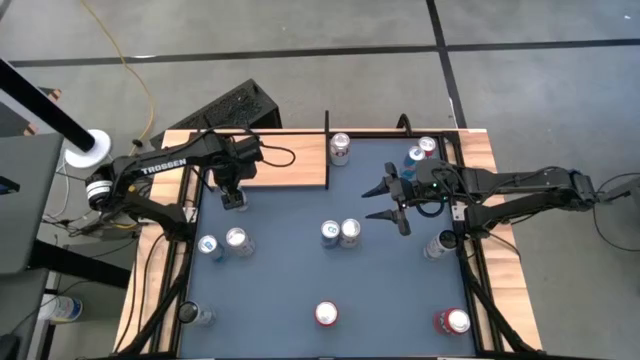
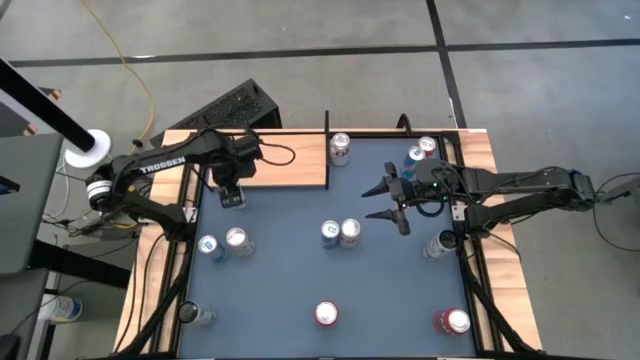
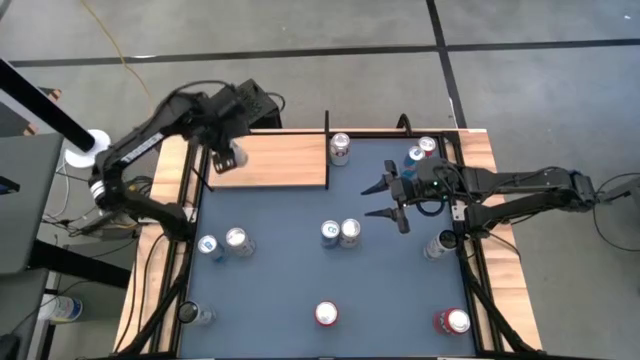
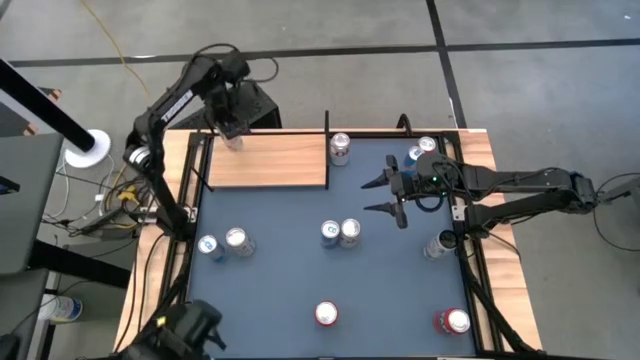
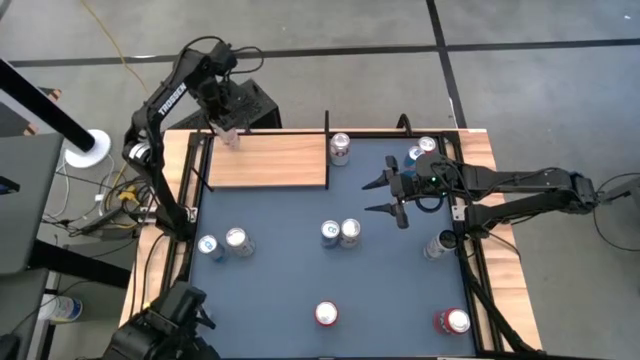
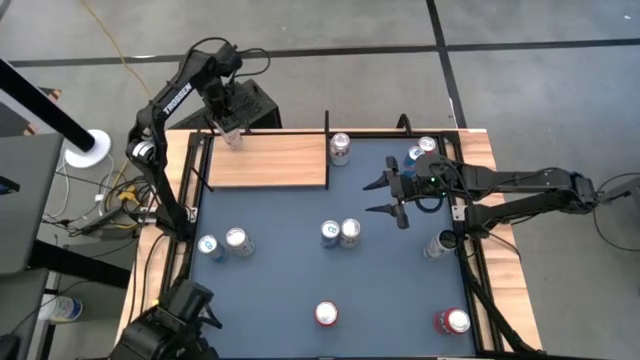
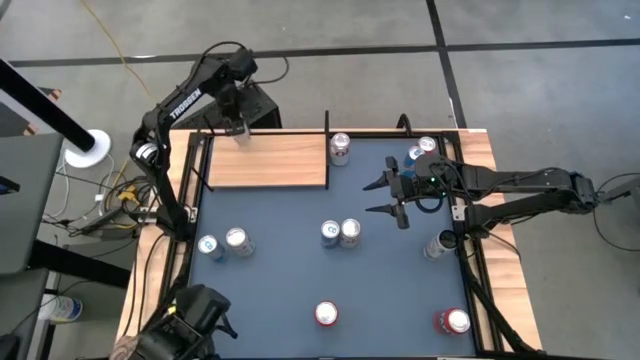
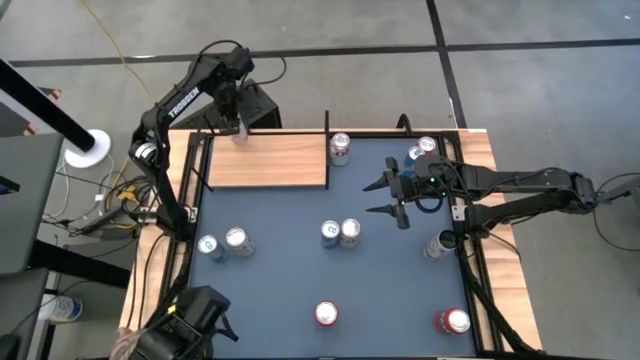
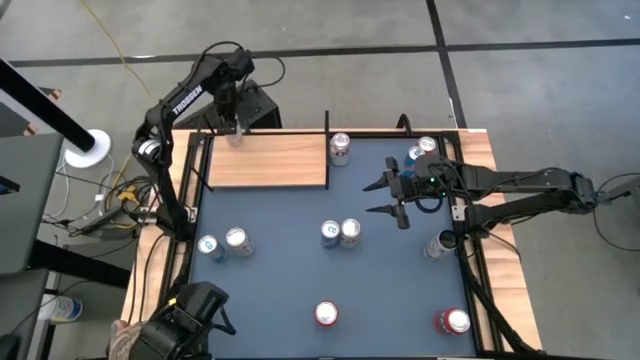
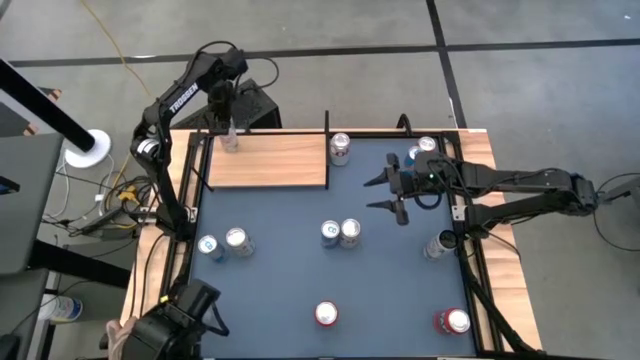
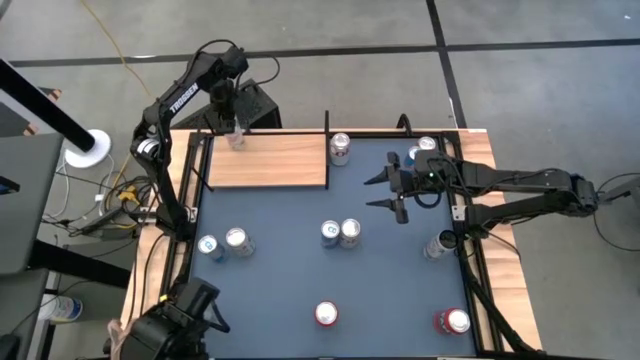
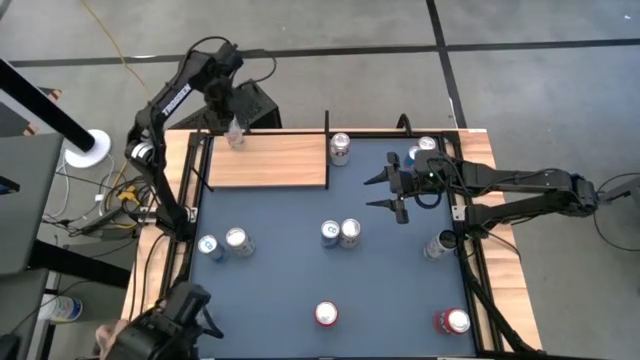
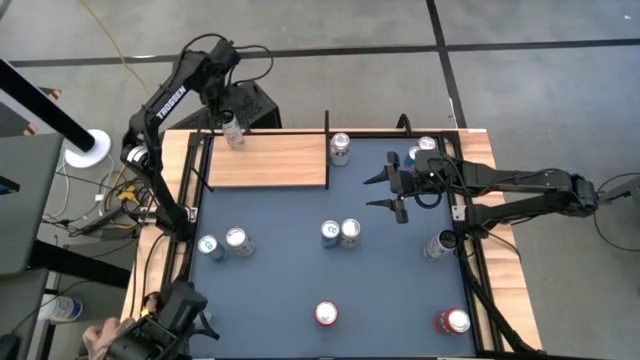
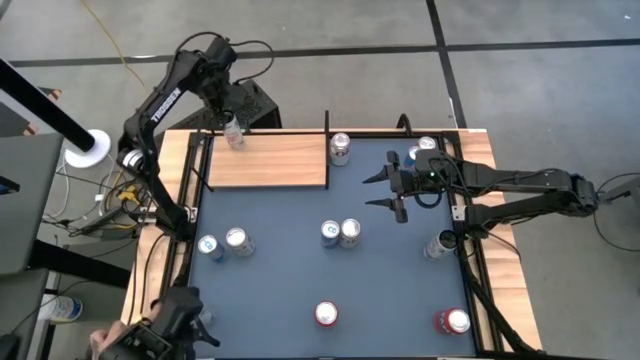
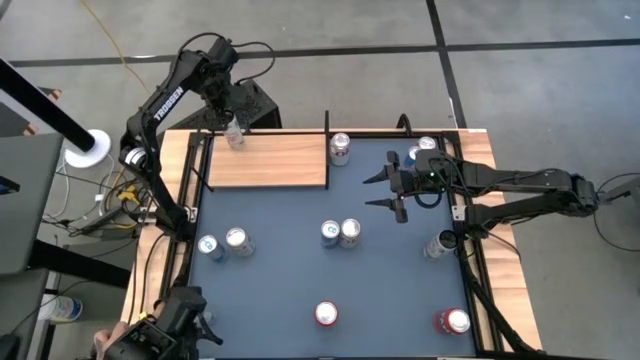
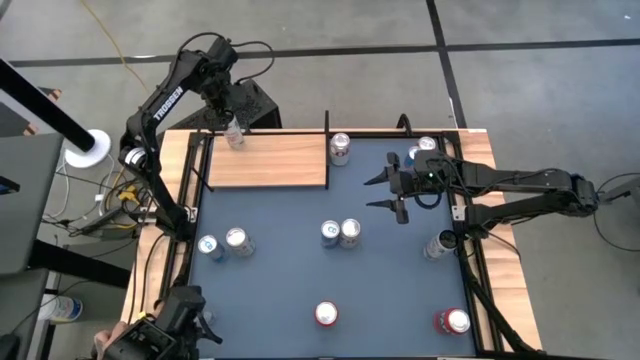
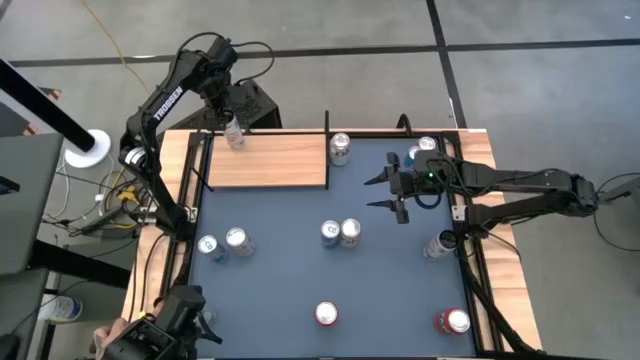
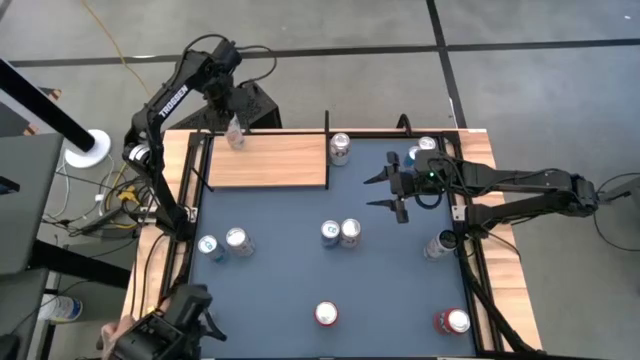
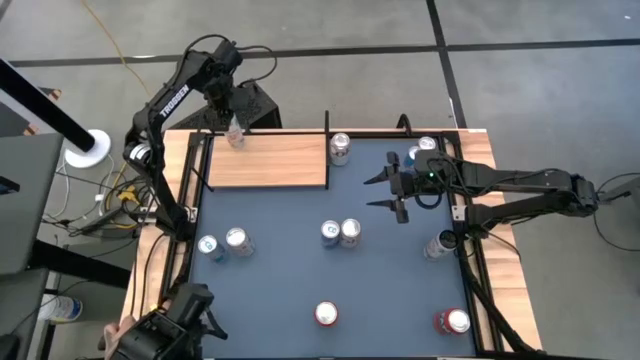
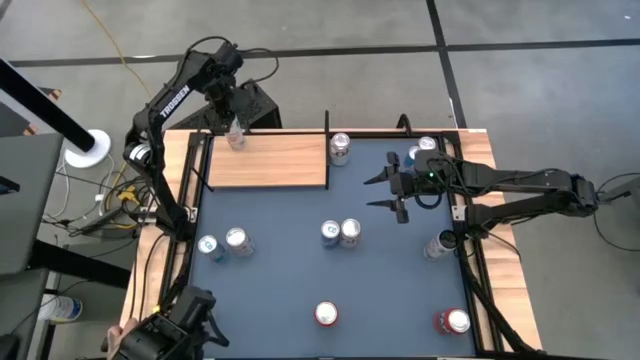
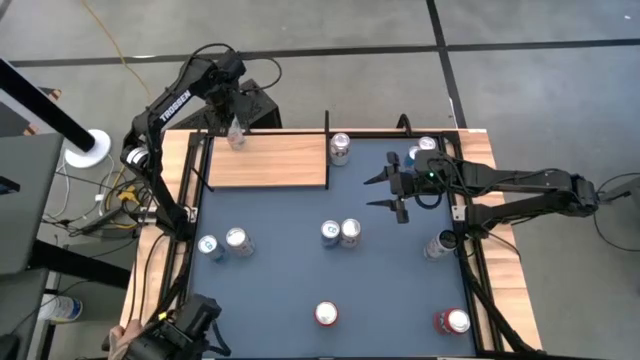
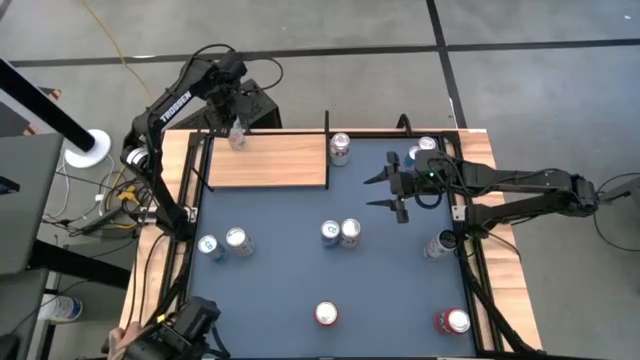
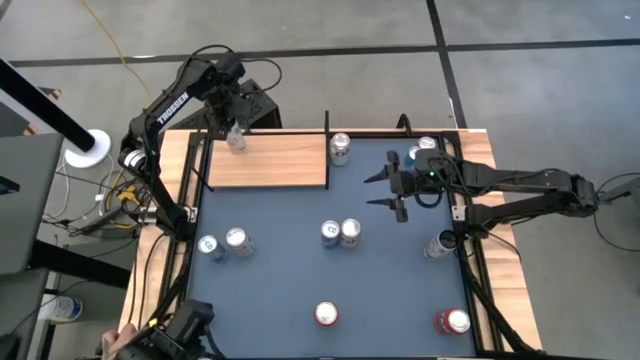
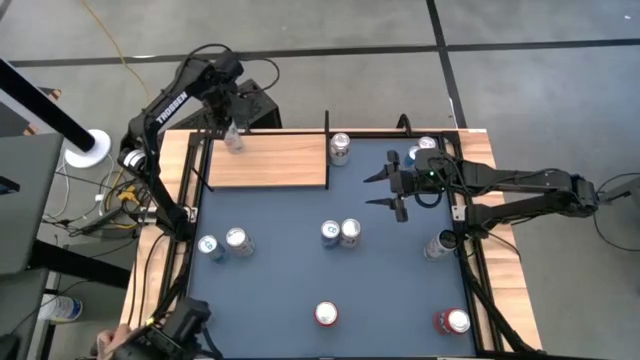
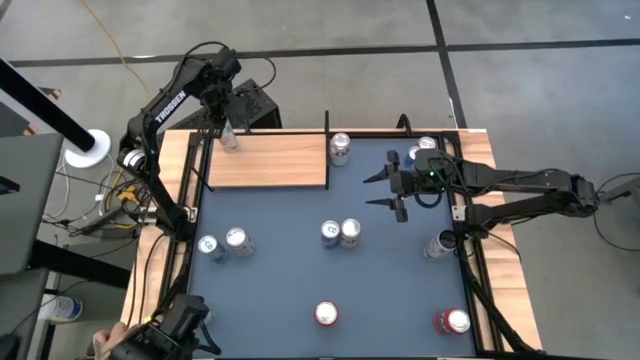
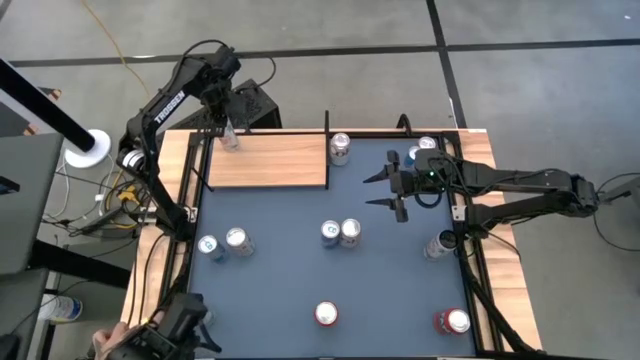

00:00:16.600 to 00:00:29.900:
Task: Place canned beverage on shelf
Put the top left white pink soda can on the shelf

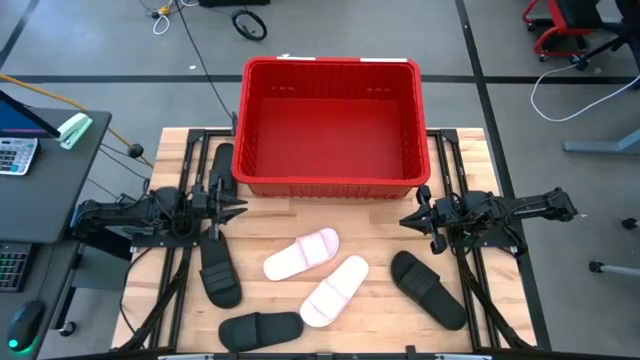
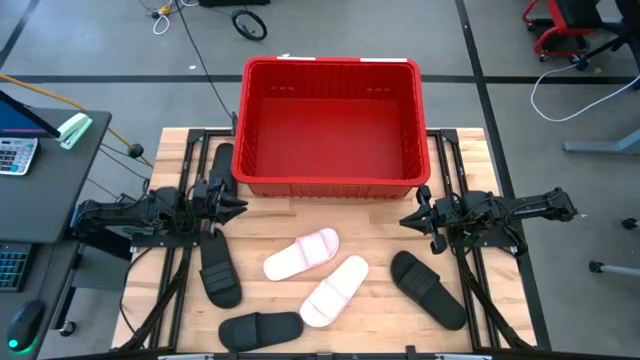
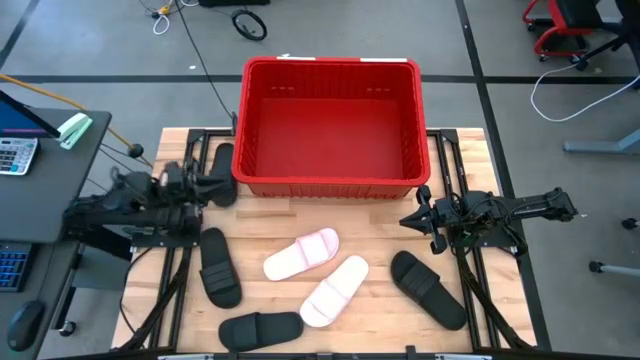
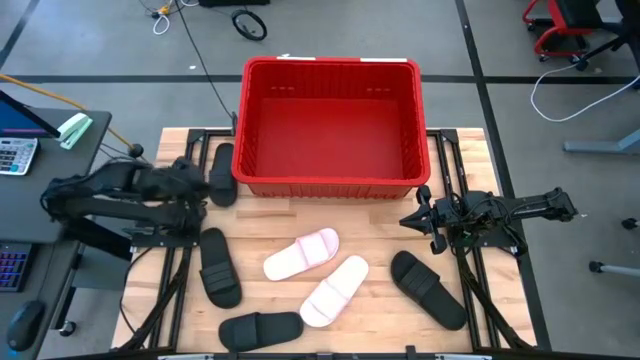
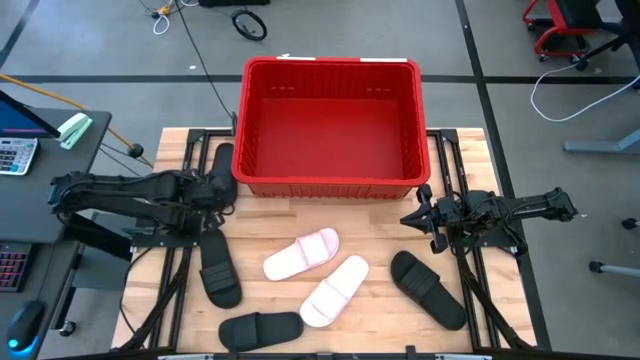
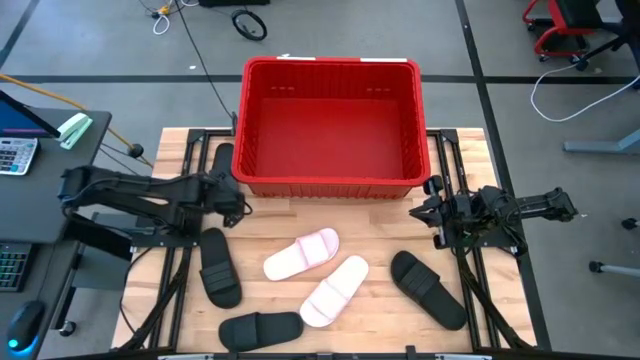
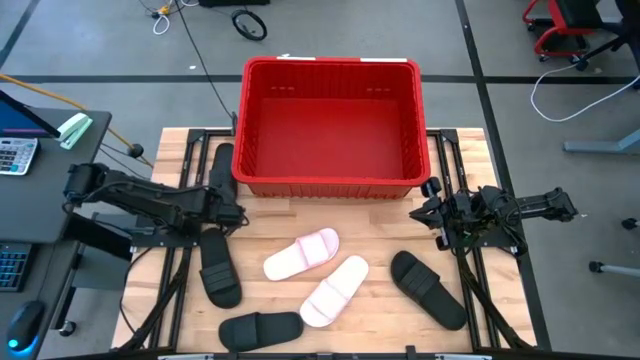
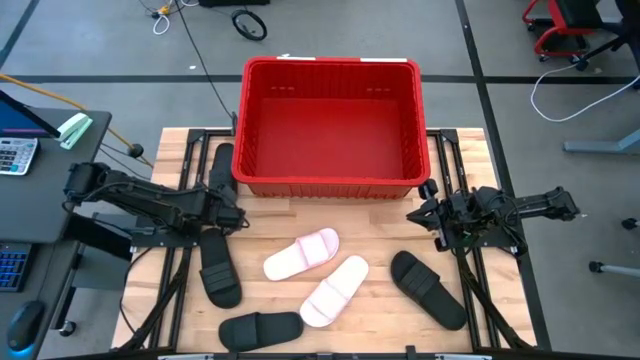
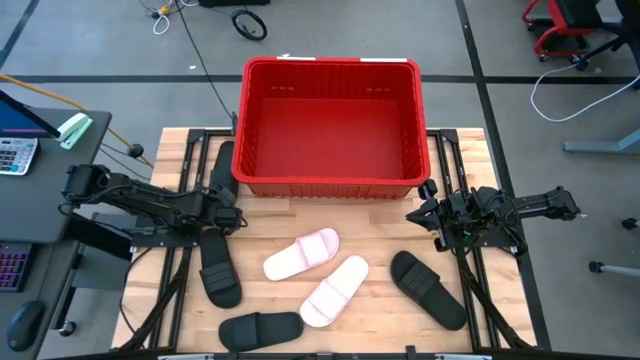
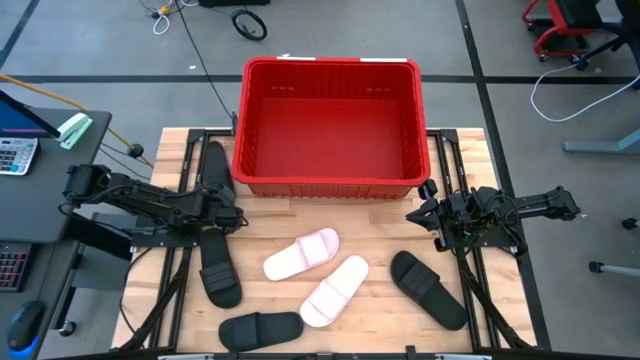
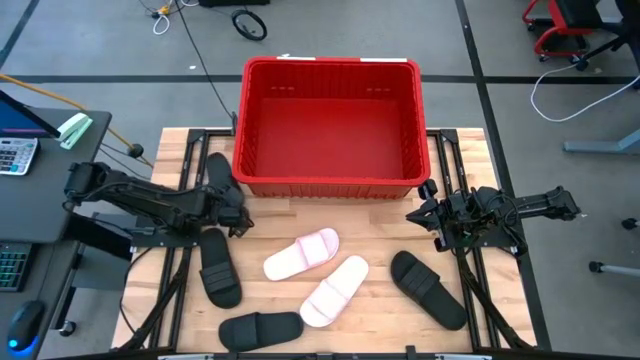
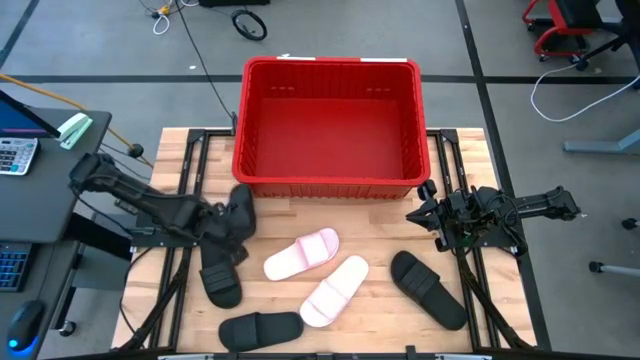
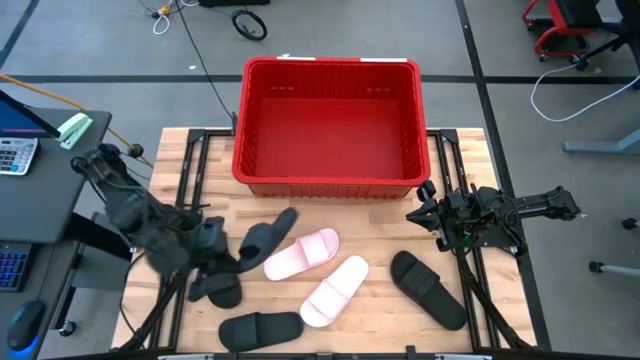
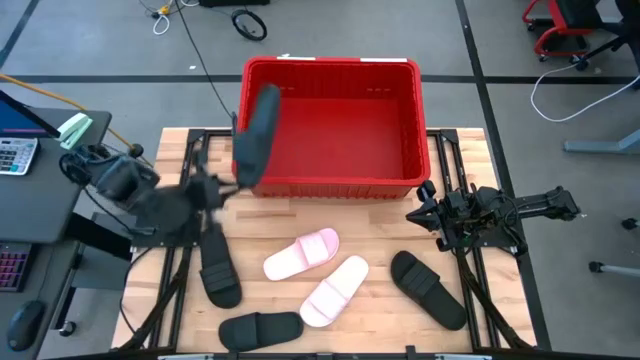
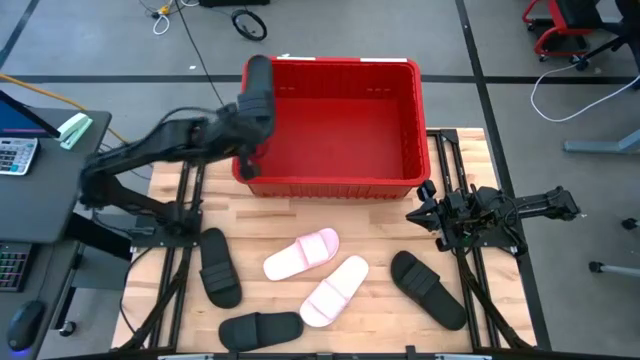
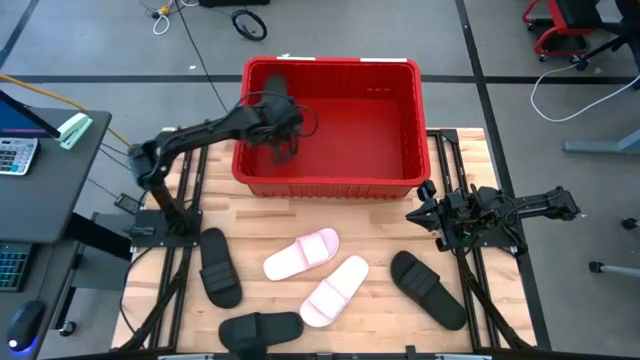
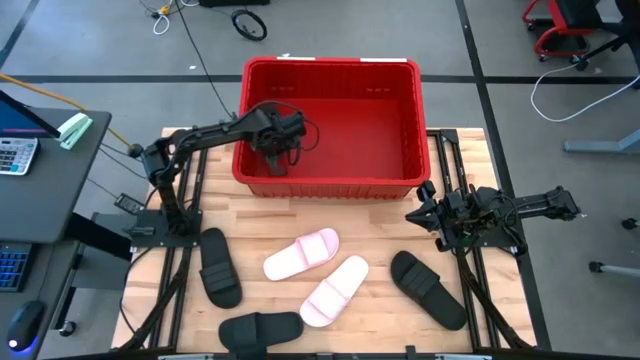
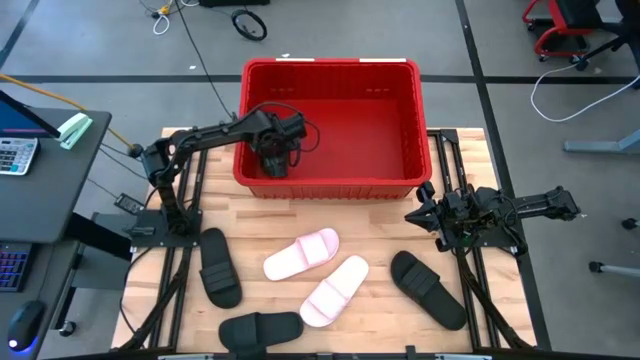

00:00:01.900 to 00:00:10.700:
Task: Pick and place slides into bin
Put the black slide into the red bin
